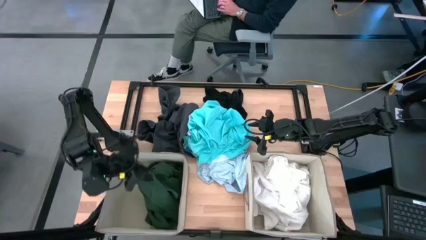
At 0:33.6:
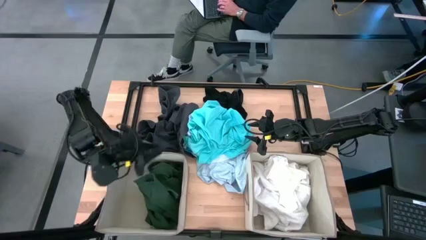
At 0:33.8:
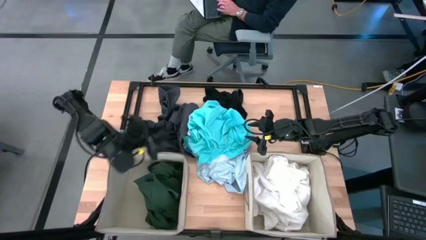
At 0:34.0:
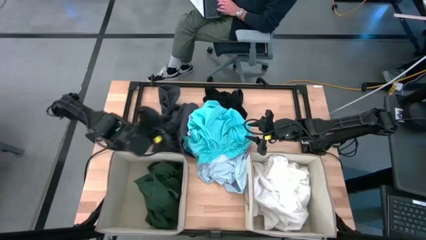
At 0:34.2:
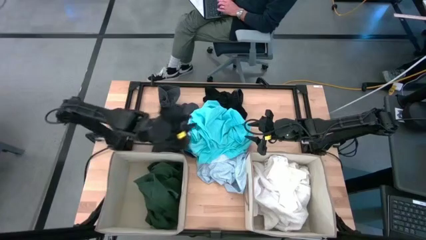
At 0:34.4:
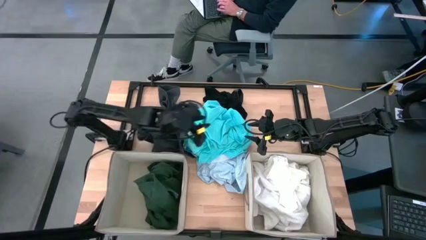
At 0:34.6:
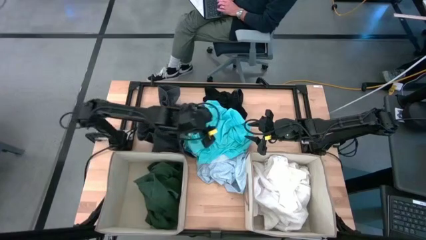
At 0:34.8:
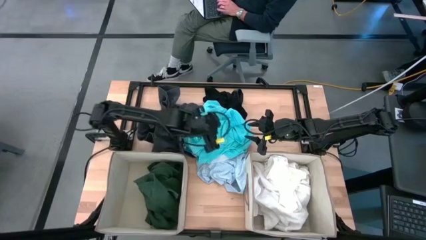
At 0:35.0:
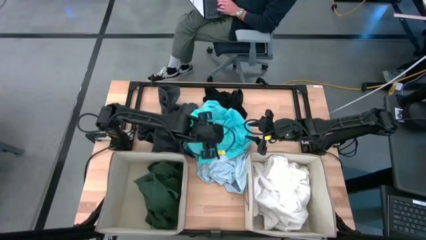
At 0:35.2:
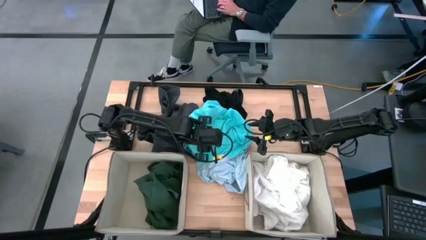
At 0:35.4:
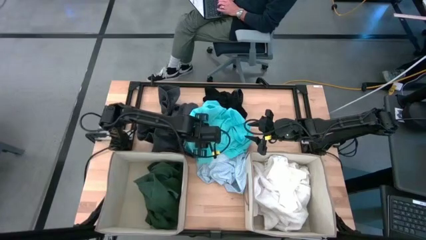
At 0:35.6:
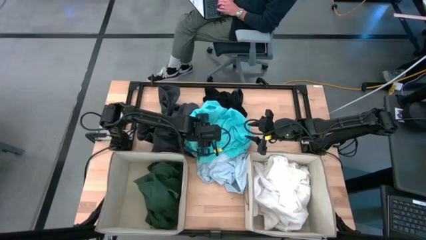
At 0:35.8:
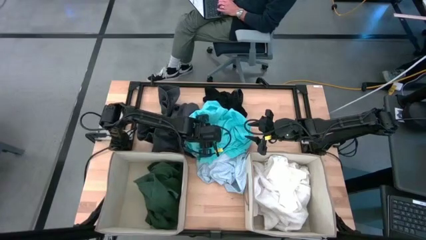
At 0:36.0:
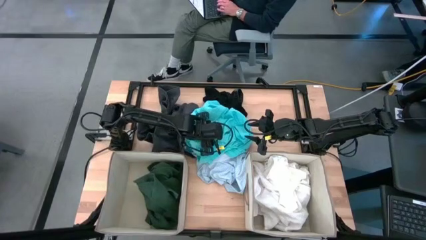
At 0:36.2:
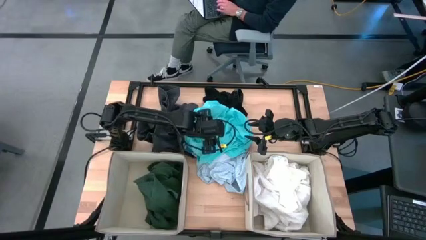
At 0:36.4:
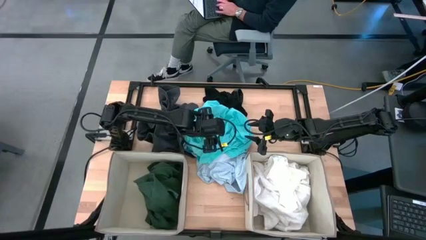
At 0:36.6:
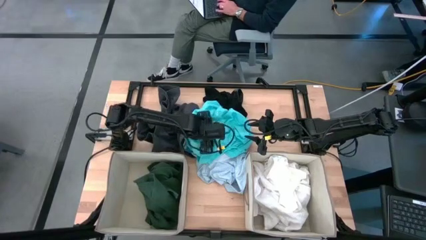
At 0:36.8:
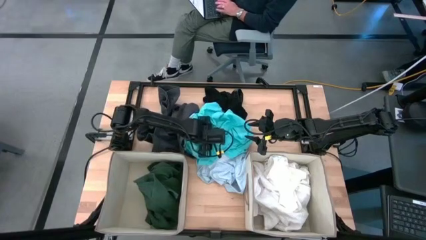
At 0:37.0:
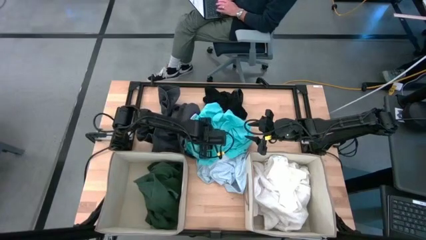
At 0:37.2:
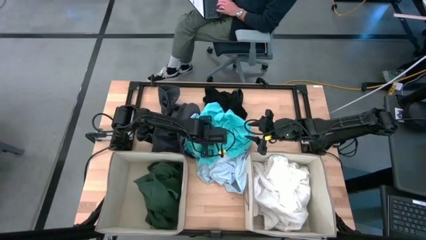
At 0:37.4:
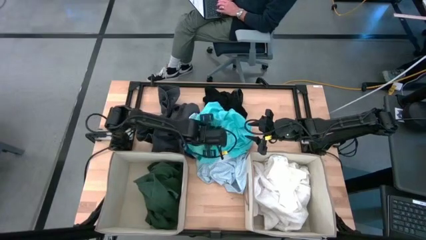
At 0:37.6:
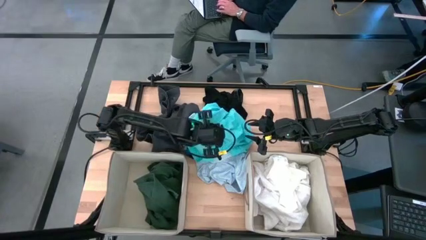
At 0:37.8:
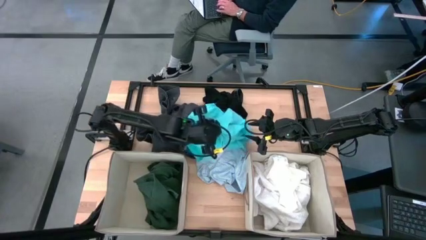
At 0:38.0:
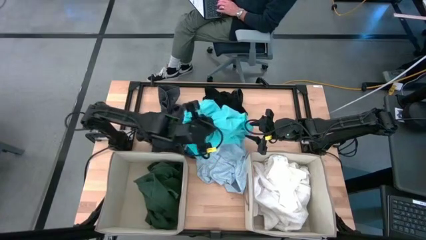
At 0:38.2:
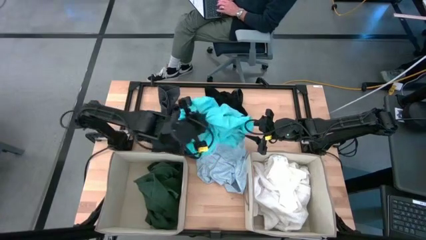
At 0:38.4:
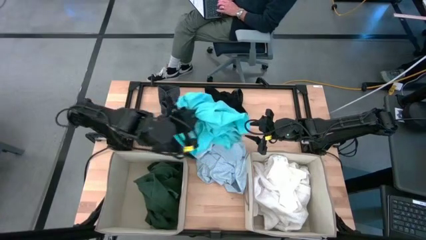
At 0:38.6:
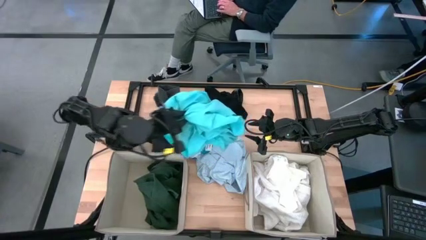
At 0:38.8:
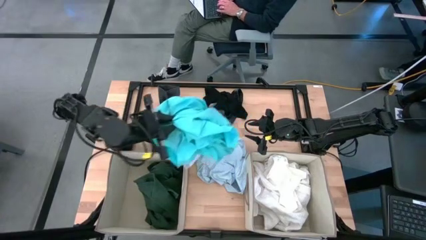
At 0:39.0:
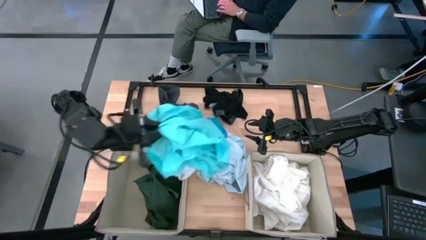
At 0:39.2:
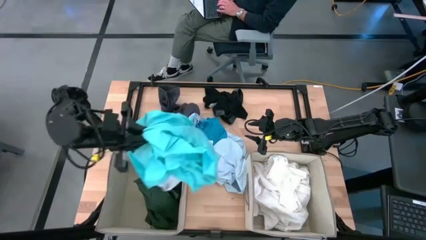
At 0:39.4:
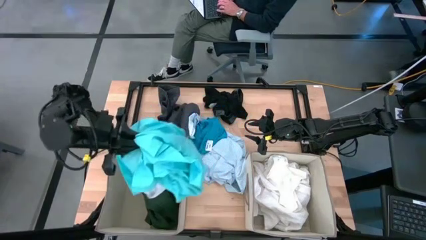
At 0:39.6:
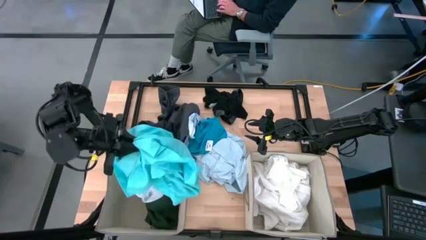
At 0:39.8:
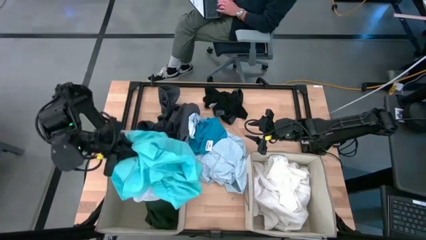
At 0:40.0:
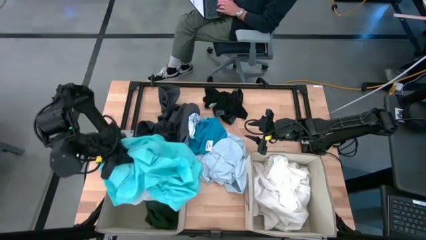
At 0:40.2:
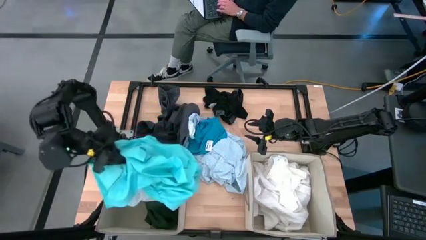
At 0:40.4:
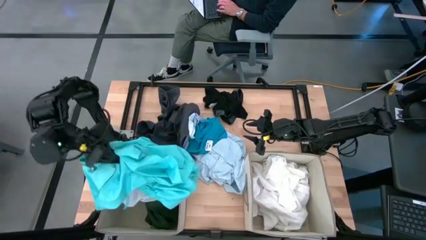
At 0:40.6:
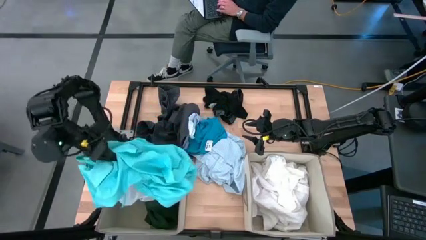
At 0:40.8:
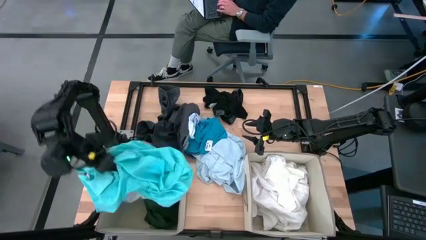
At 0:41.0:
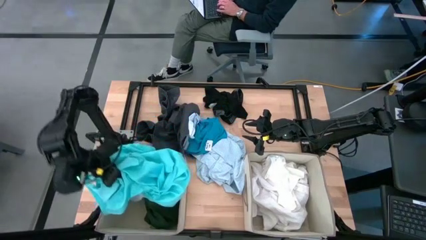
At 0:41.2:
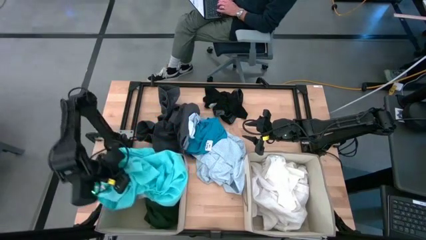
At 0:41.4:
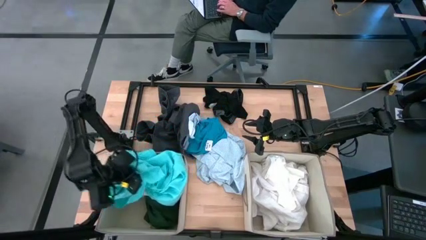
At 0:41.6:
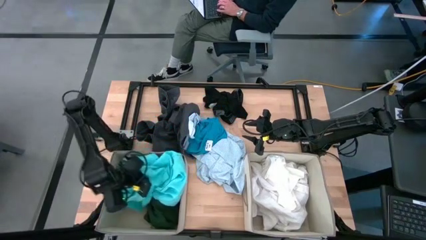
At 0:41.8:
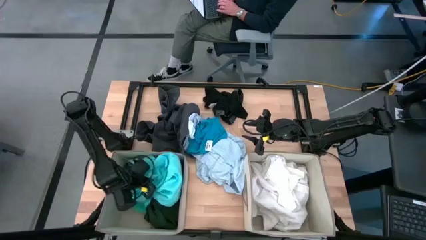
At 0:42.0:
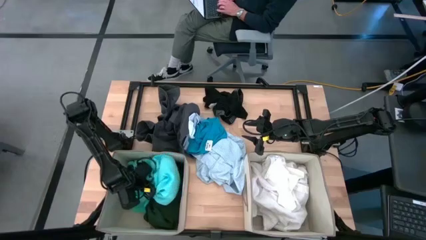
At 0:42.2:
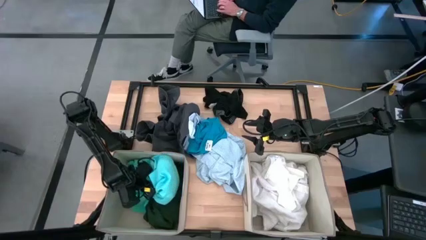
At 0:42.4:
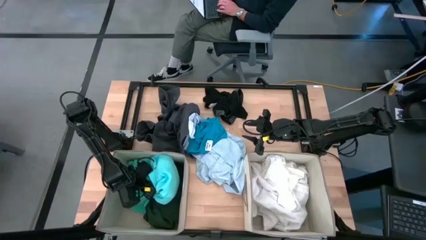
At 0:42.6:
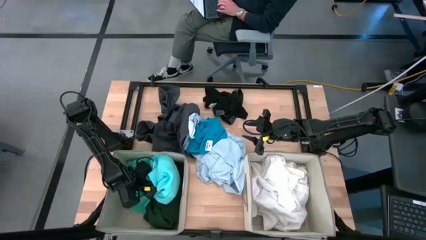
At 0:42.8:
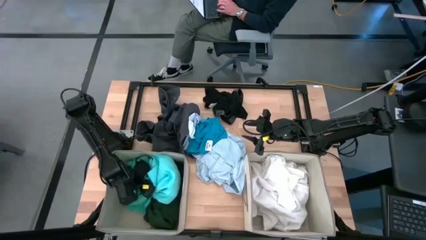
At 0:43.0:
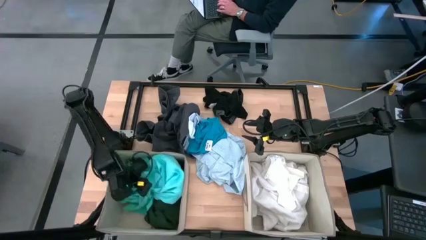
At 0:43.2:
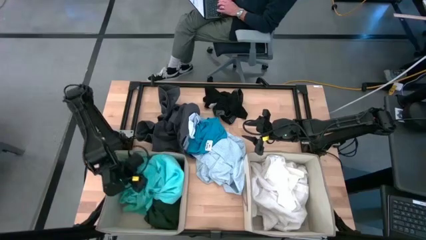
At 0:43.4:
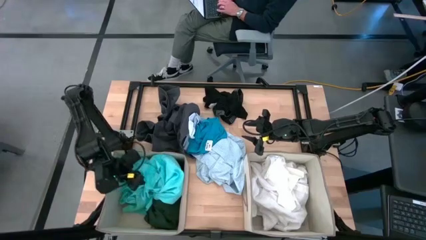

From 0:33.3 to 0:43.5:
Task: Sort clothes
Put the light blue shorts into the left brown laundry organizer

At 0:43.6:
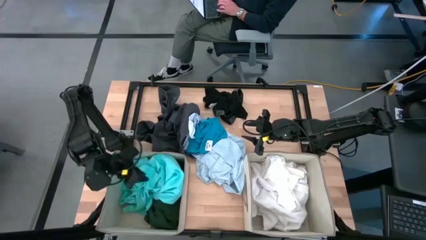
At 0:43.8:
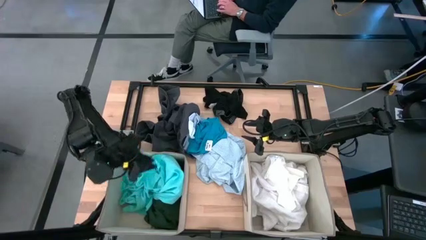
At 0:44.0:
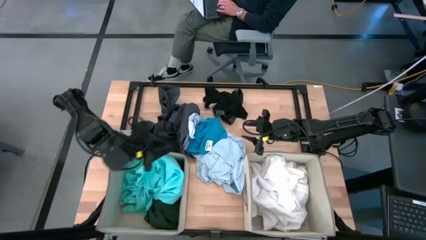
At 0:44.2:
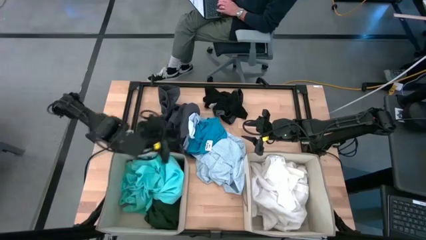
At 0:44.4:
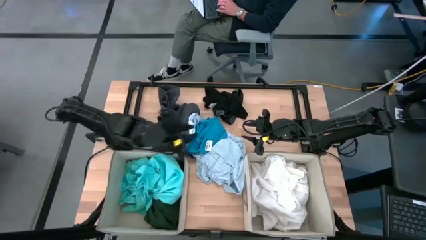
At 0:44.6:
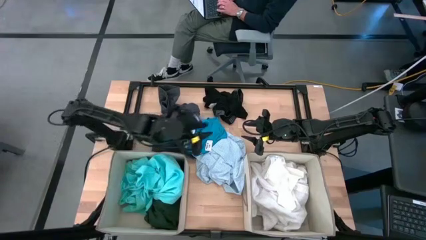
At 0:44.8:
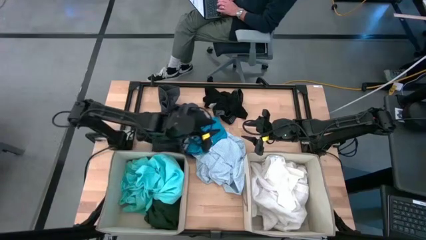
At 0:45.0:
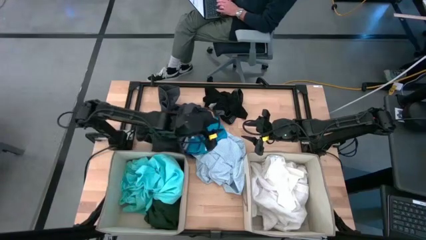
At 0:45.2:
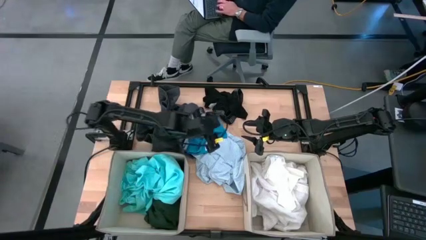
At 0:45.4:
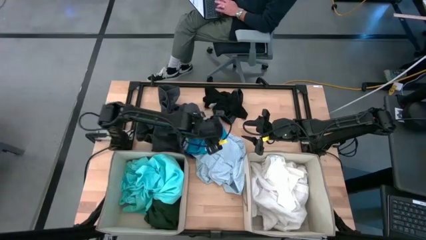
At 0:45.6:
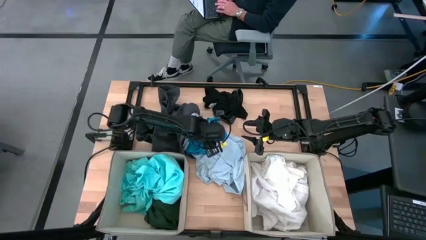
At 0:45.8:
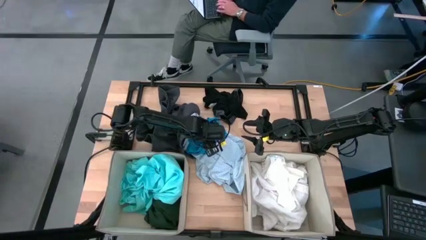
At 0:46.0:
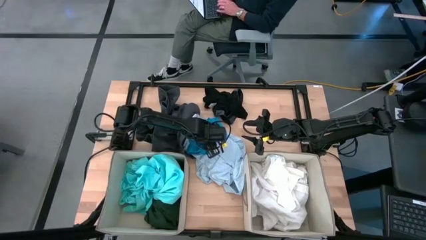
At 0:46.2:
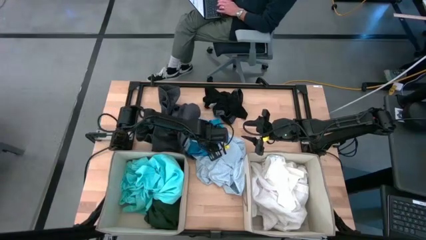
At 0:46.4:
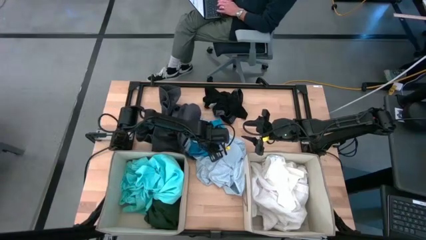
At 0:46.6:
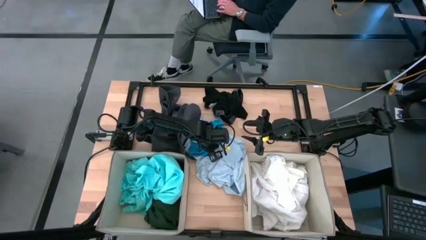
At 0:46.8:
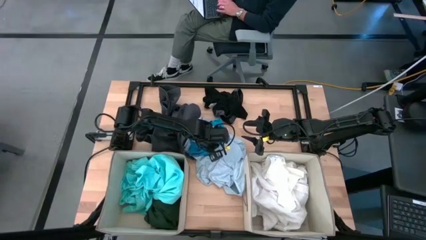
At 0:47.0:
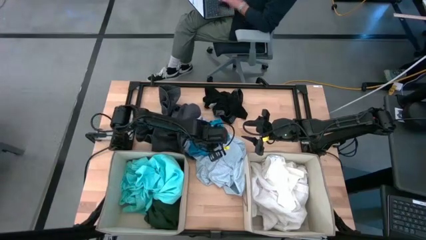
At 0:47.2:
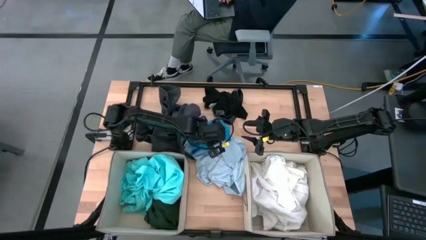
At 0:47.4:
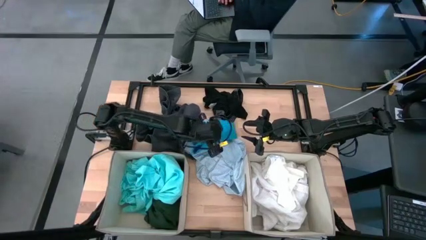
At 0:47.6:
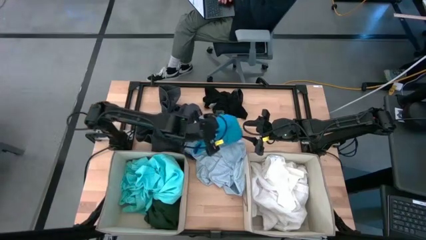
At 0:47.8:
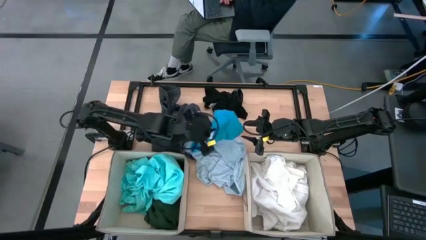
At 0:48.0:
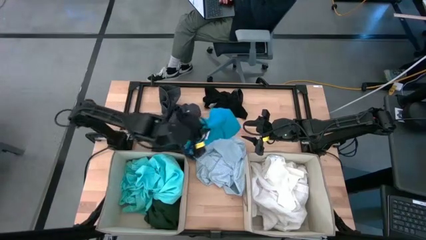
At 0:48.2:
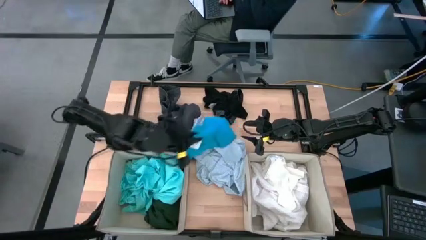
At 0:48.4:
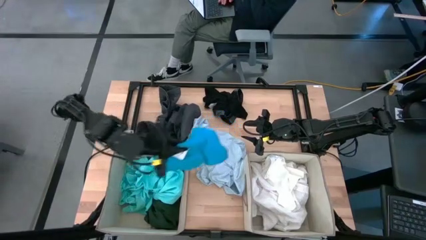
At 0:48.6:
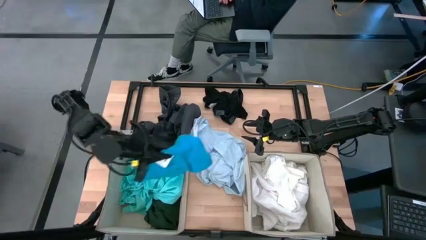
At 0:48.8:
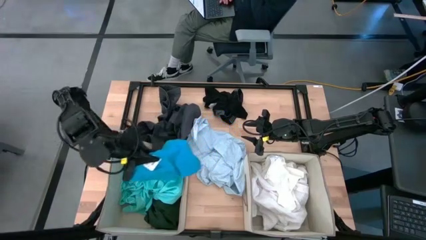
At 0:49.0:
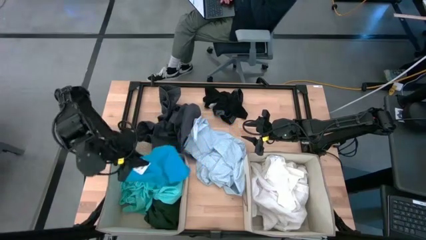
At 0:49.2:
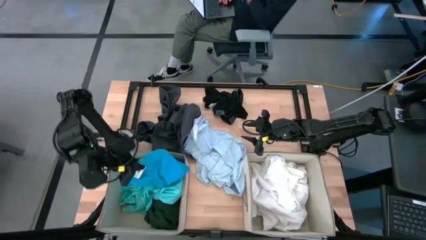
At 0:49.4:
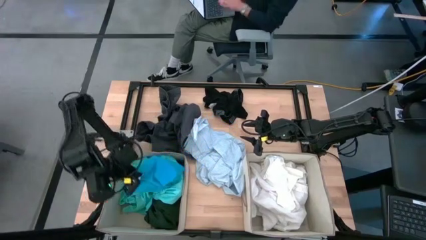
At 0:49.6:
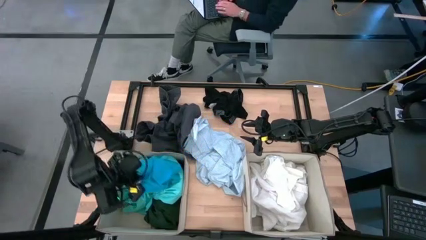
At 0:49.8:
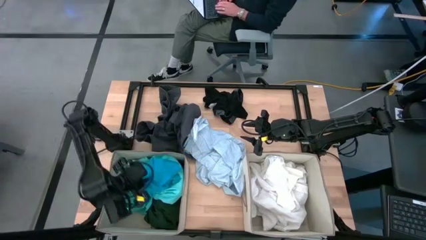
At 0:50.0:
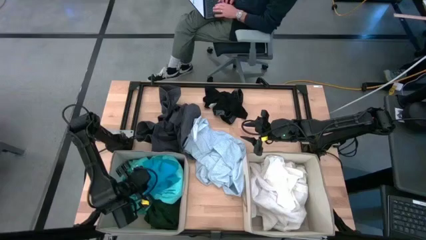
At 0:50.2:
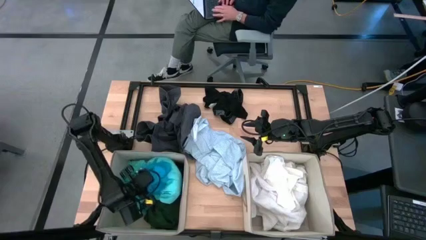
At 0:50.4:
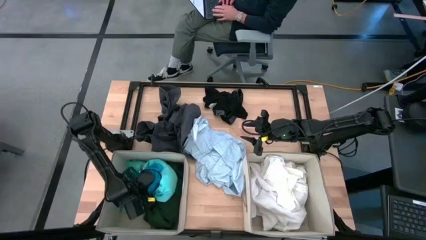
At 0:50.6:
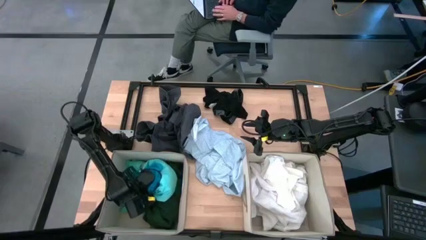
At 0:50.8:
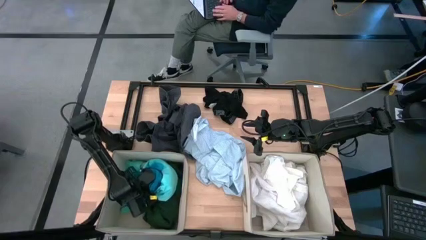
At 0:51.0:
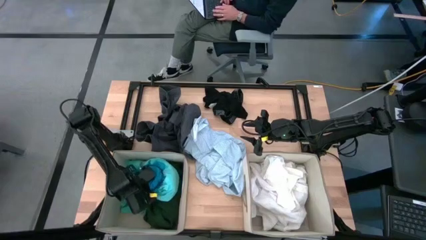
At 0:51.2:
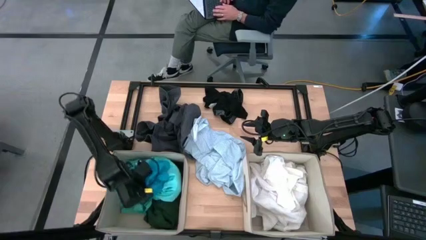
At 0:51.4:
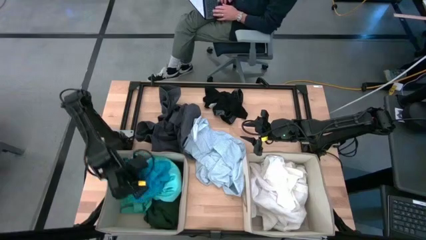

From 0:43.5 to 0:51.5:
Put the blue shorts into the left brown laundry organizer
